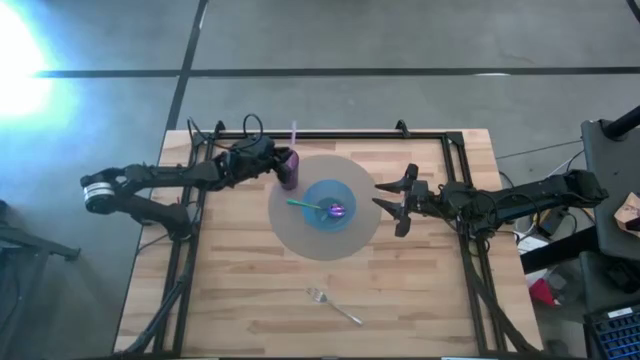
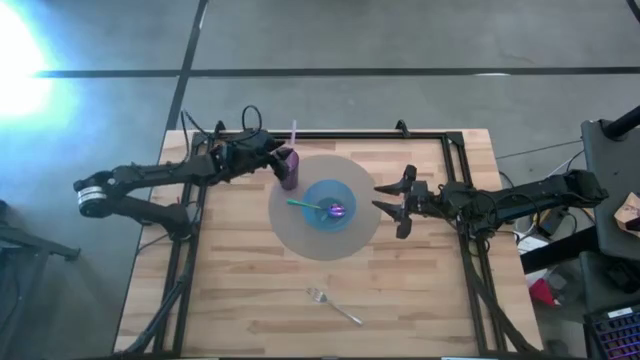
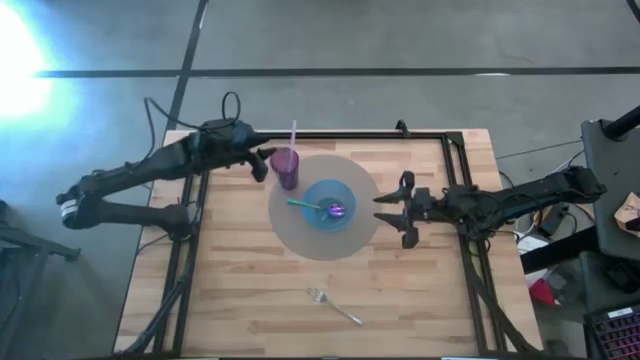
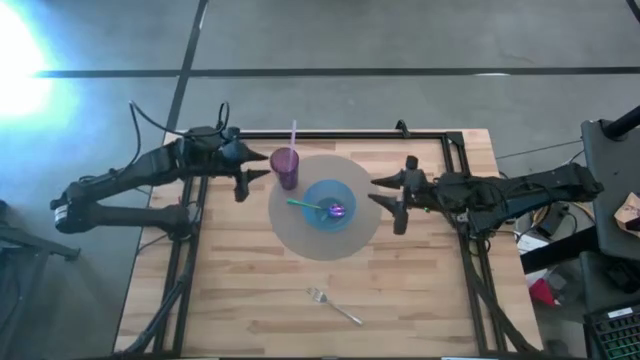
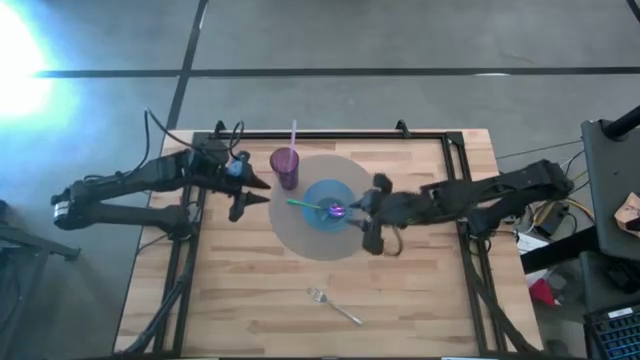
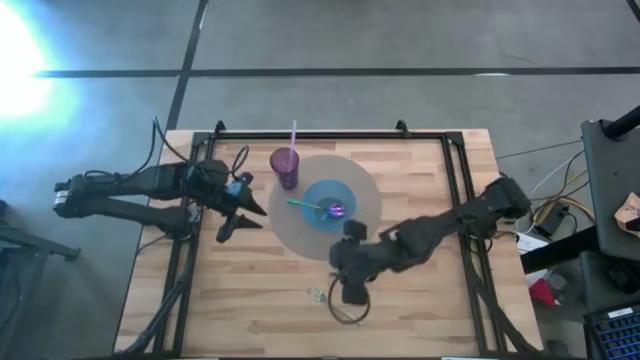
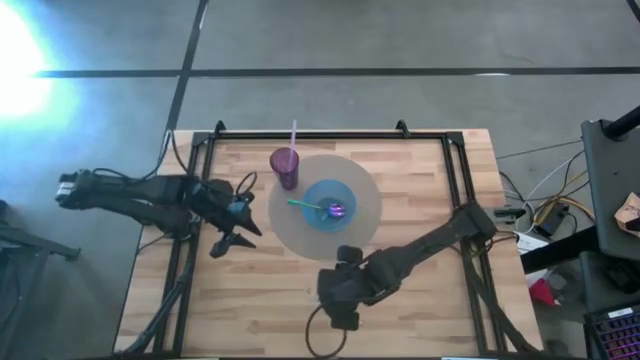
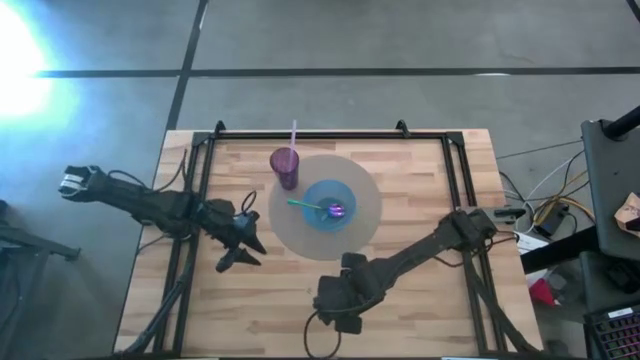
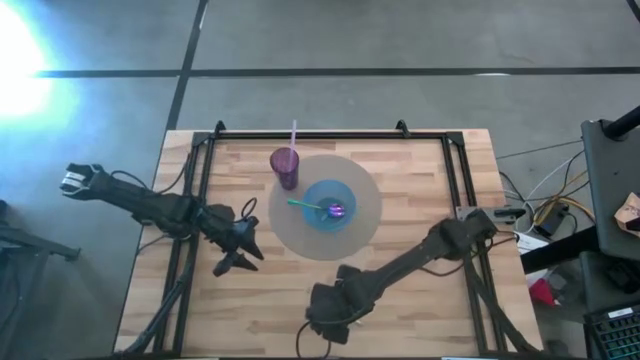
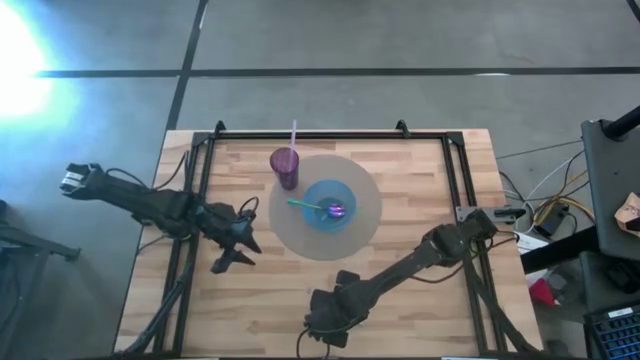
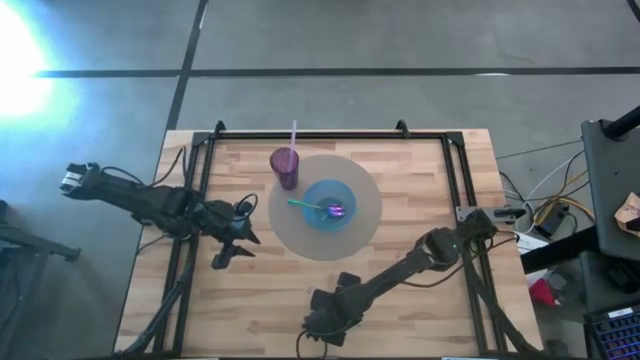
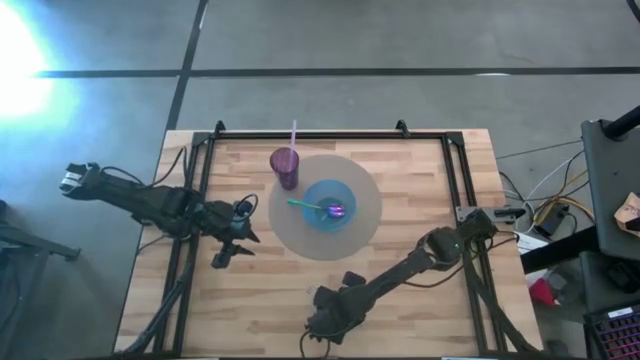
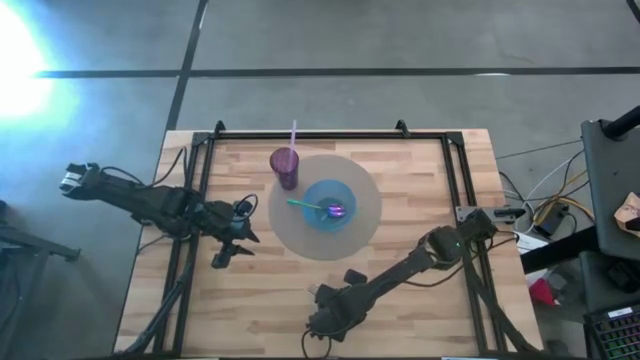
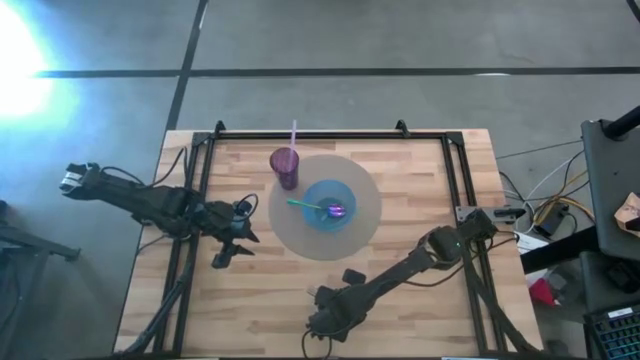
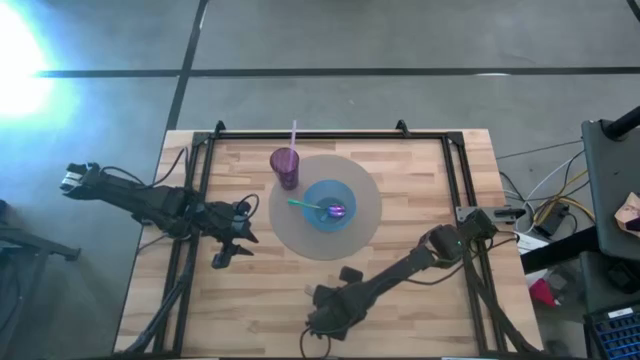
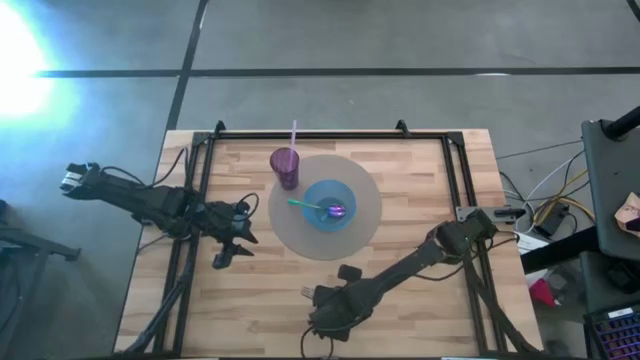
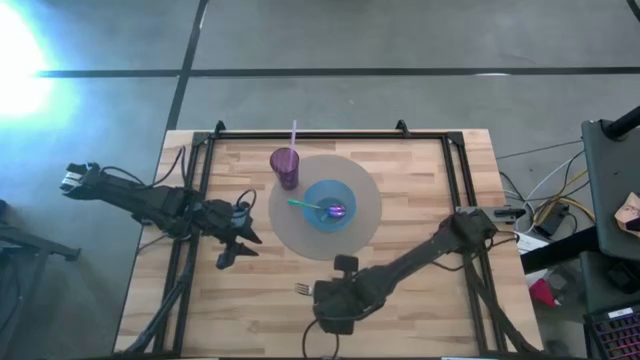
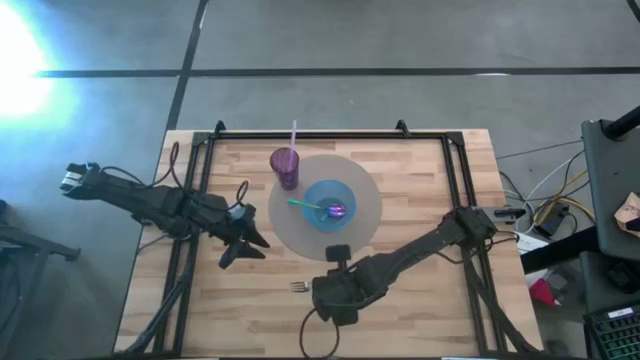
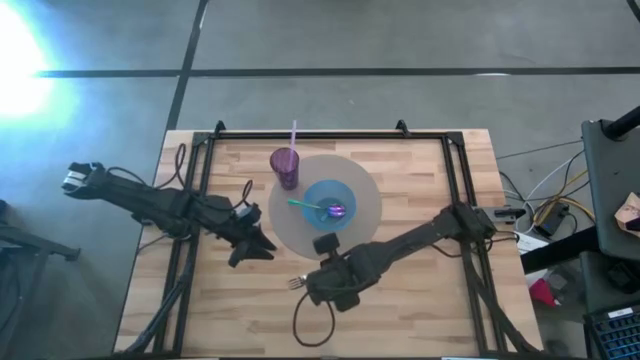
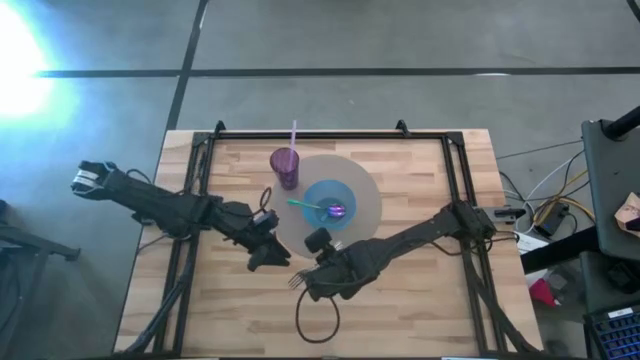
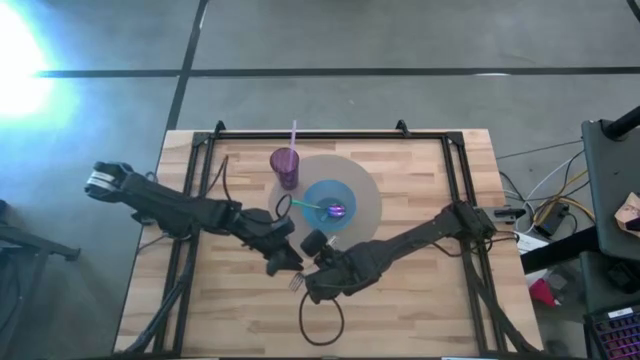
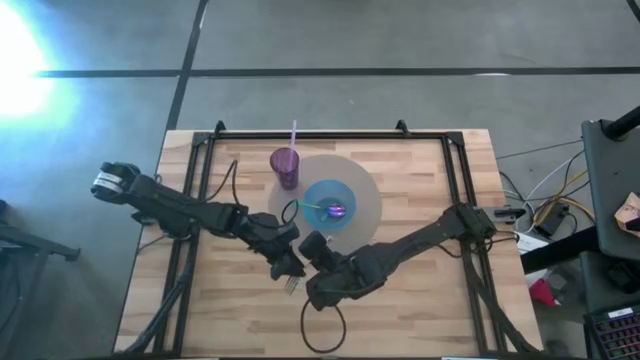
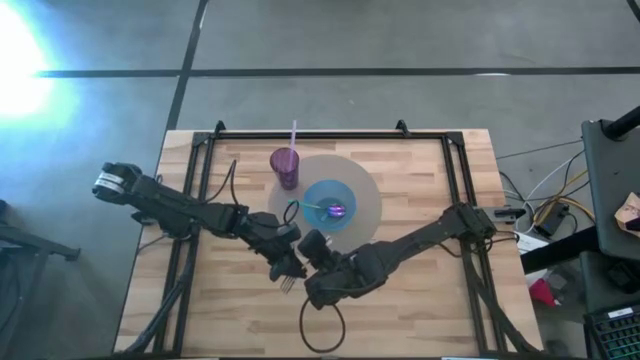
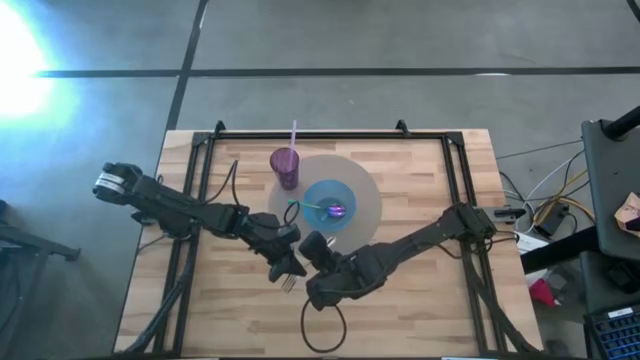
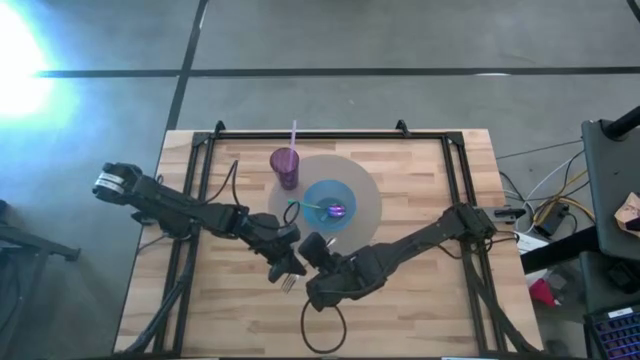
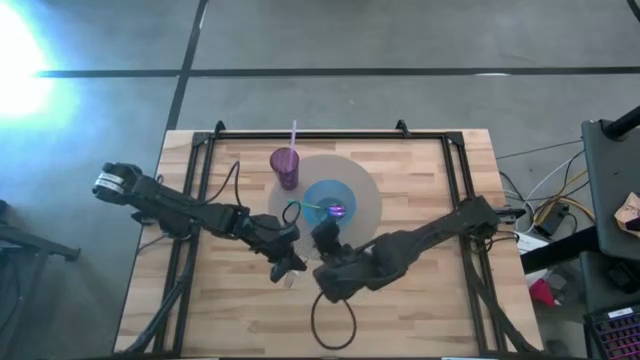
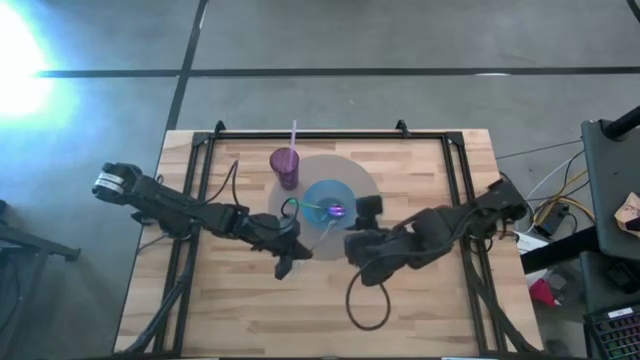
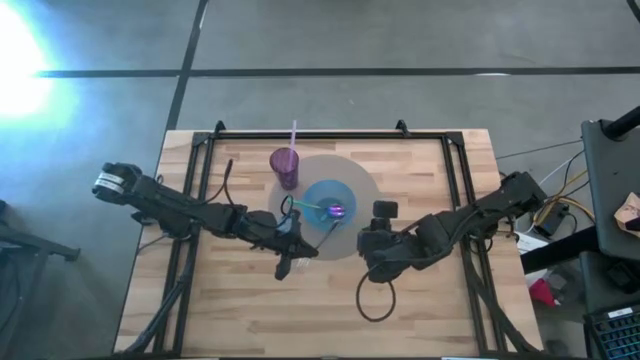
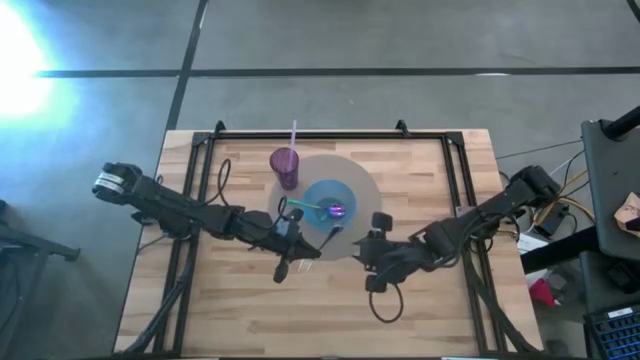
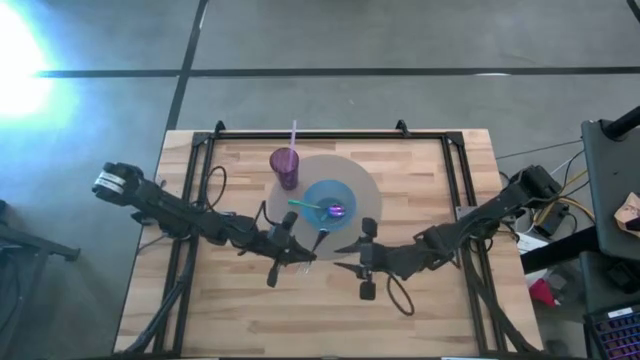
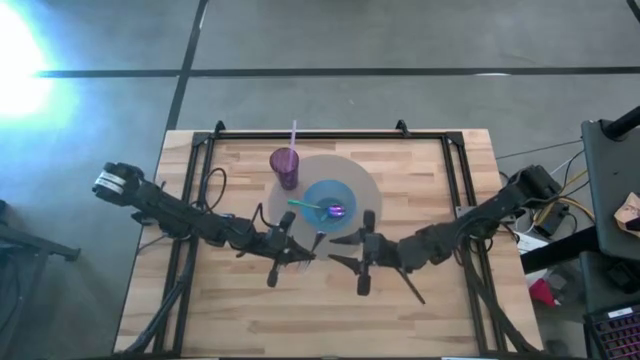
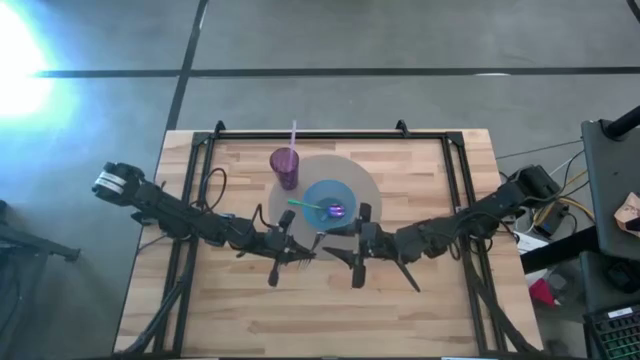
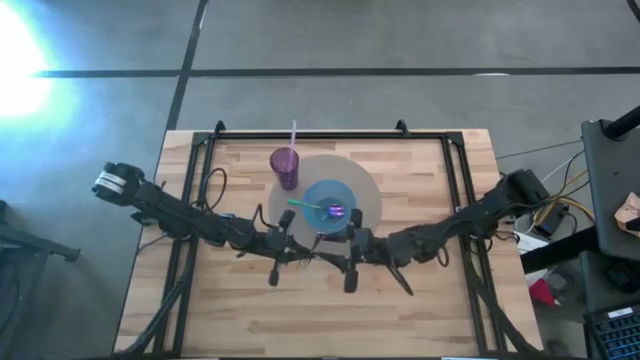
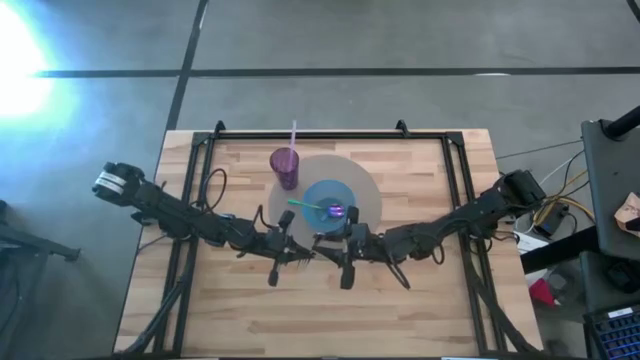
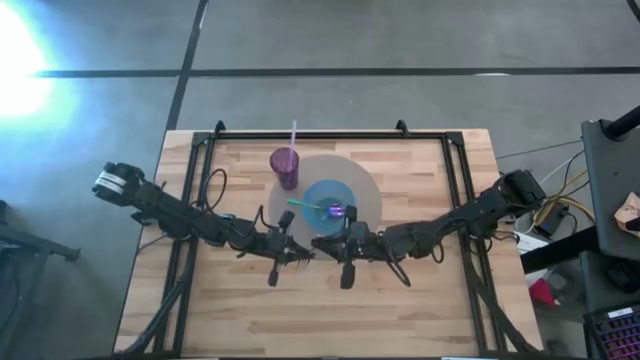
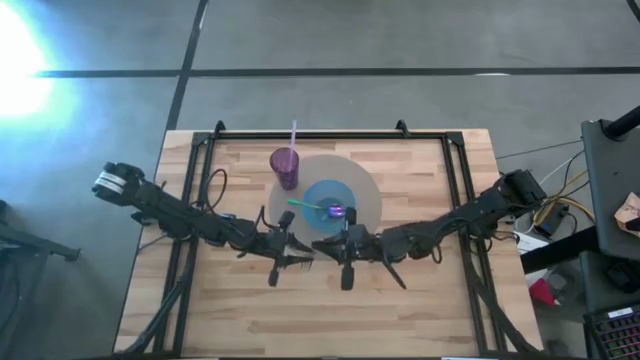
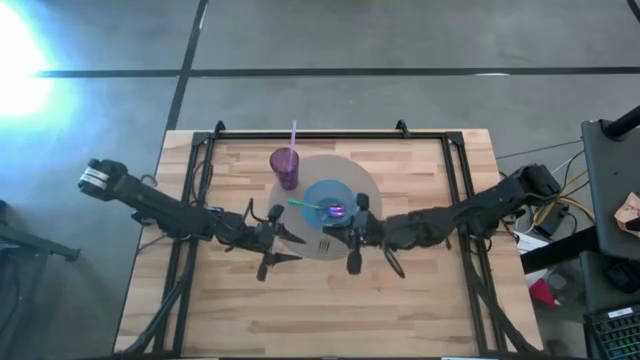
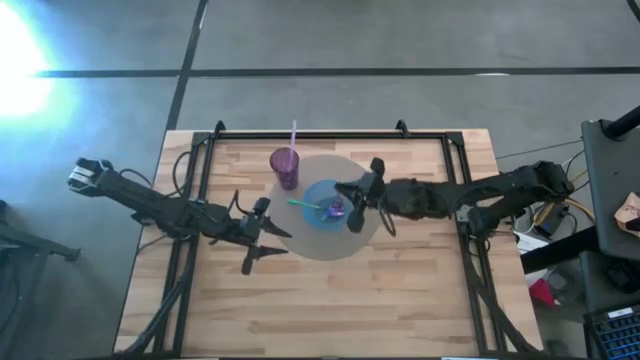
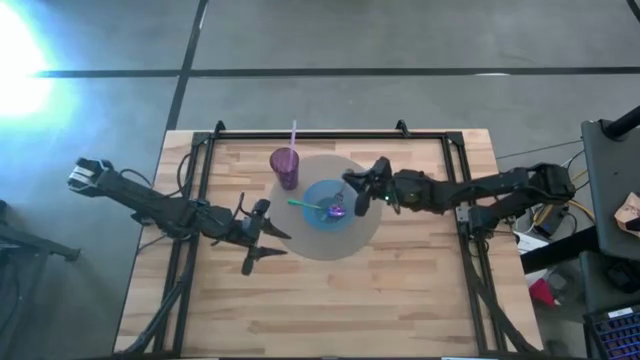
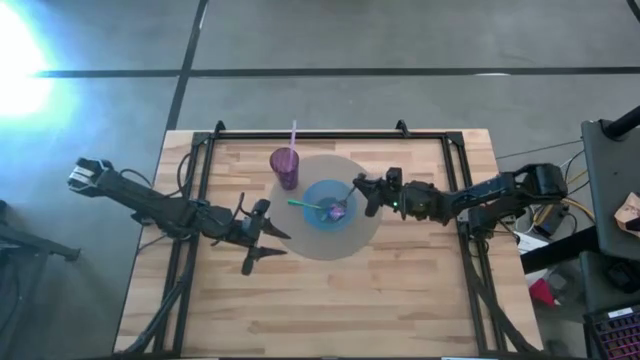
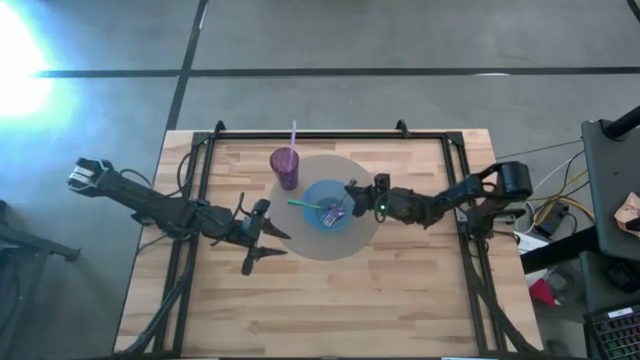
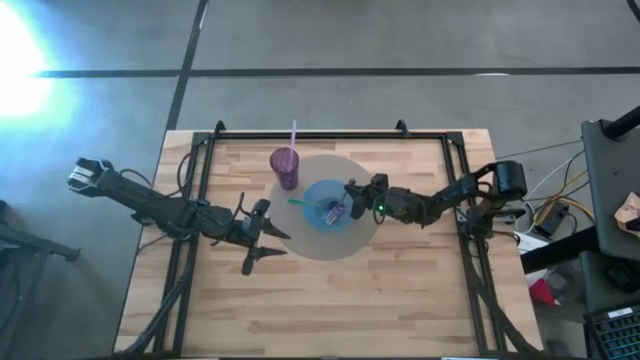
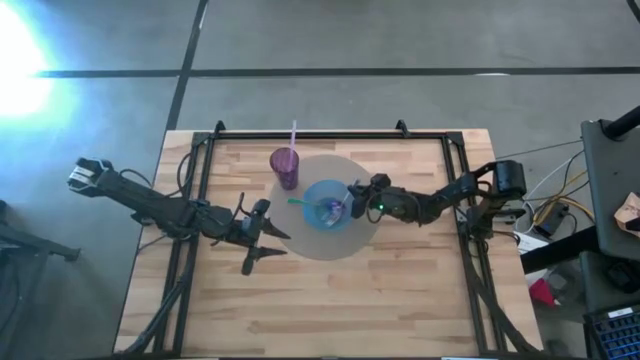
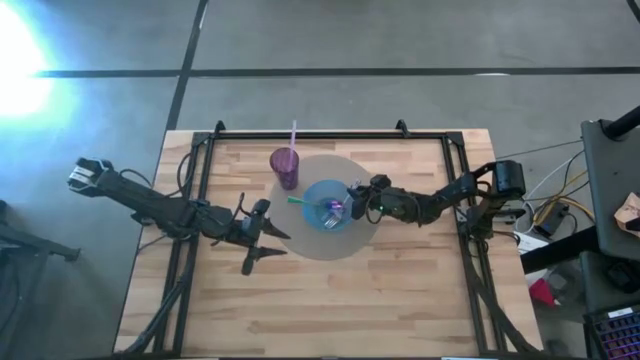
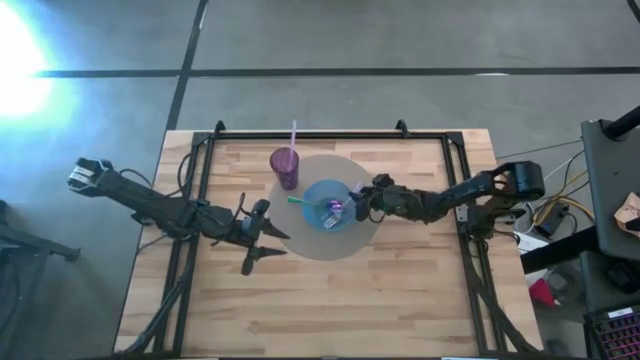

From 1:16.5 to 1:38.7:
Task: Pick & Place Utensil
Put the silver fork into the blue bowl on the gray mat
